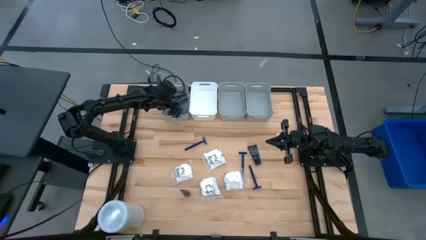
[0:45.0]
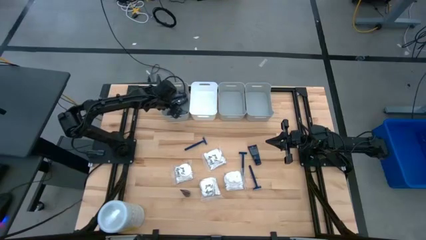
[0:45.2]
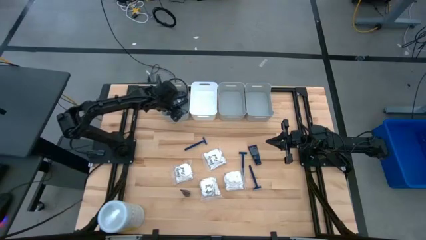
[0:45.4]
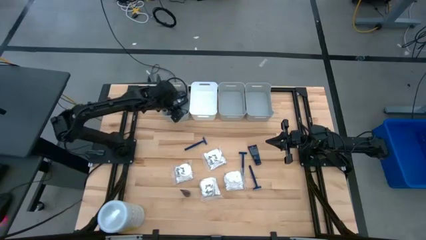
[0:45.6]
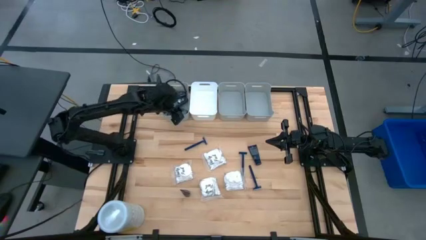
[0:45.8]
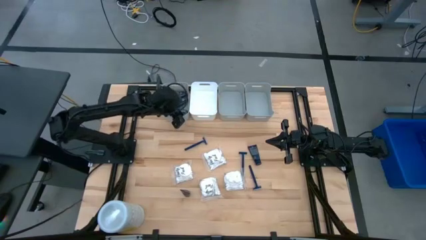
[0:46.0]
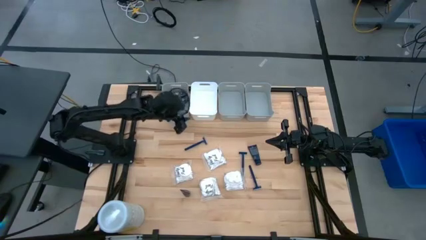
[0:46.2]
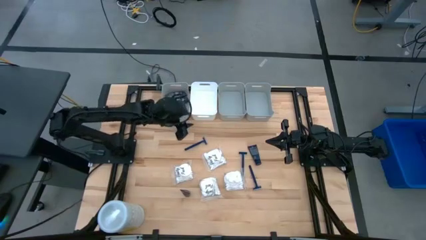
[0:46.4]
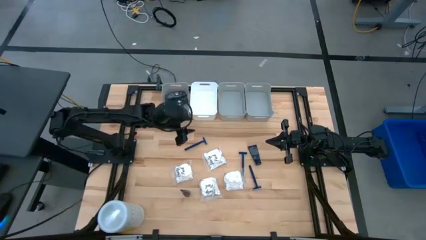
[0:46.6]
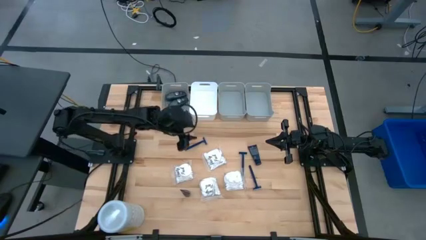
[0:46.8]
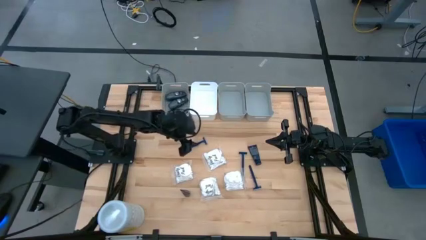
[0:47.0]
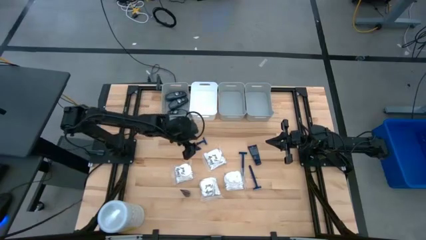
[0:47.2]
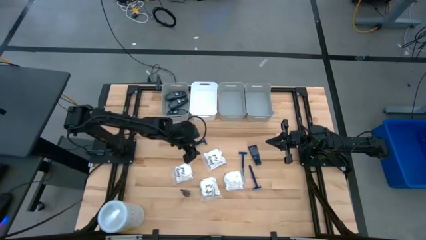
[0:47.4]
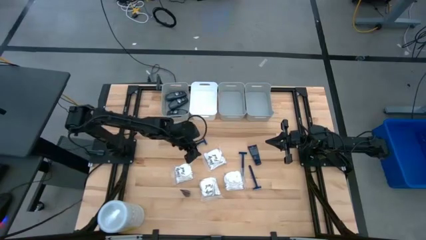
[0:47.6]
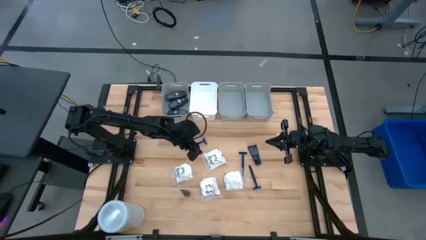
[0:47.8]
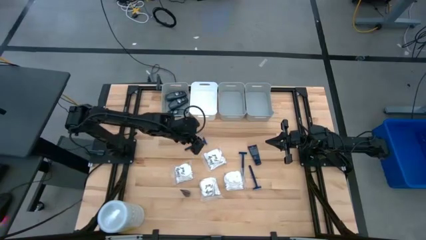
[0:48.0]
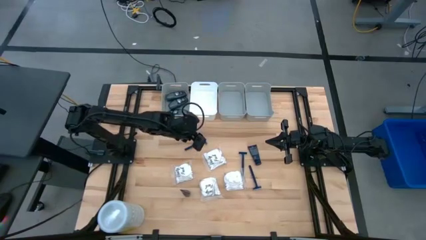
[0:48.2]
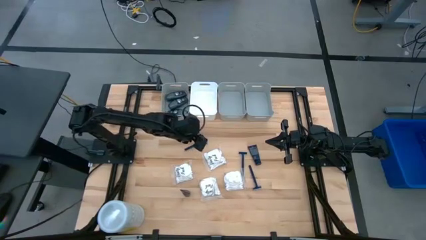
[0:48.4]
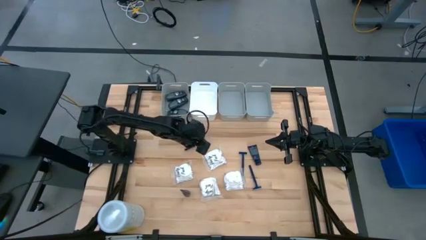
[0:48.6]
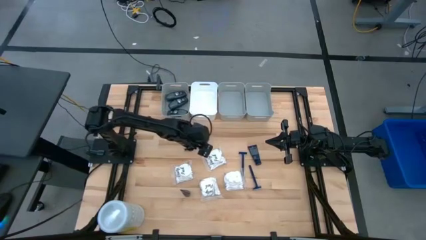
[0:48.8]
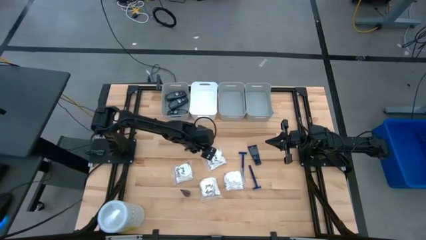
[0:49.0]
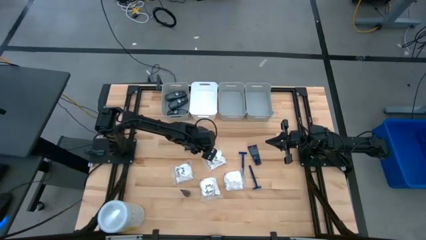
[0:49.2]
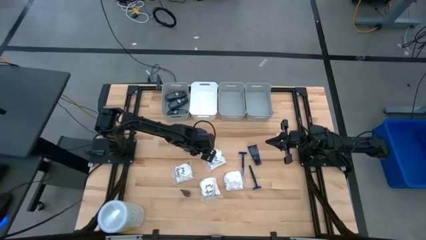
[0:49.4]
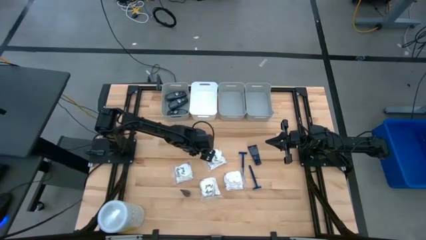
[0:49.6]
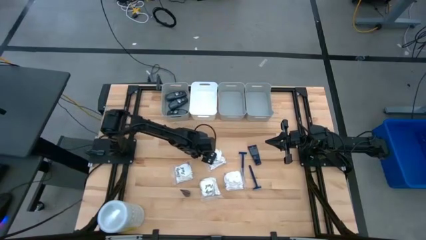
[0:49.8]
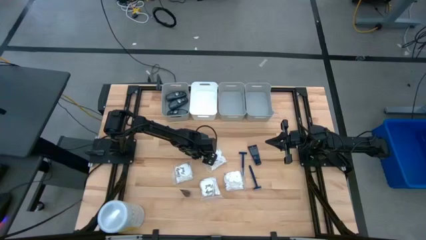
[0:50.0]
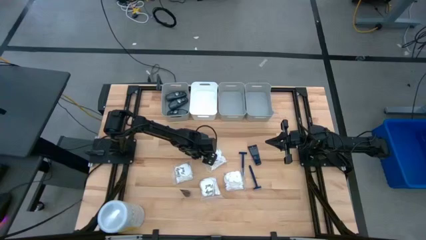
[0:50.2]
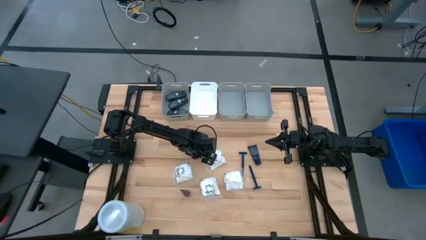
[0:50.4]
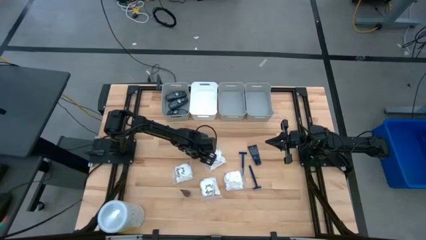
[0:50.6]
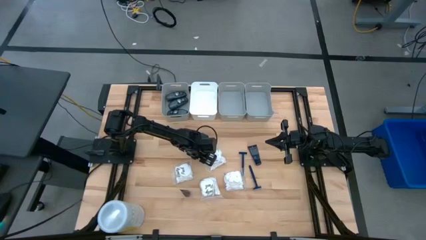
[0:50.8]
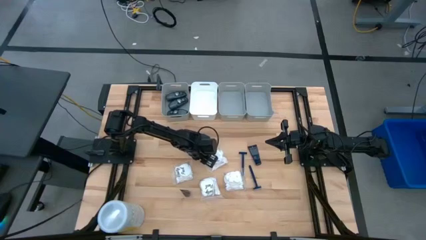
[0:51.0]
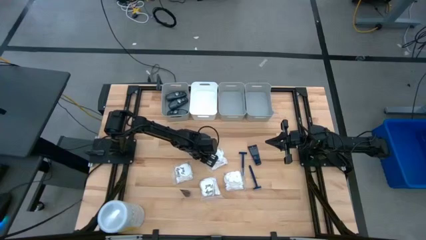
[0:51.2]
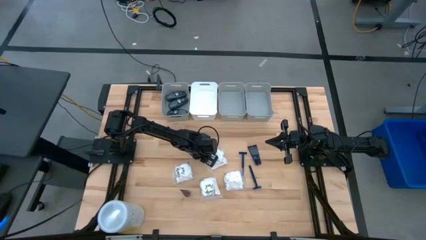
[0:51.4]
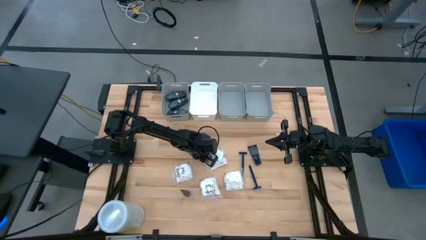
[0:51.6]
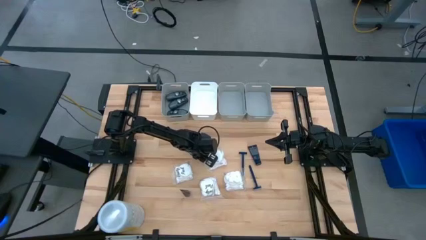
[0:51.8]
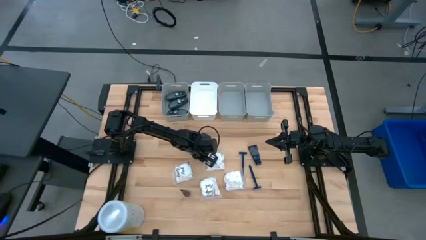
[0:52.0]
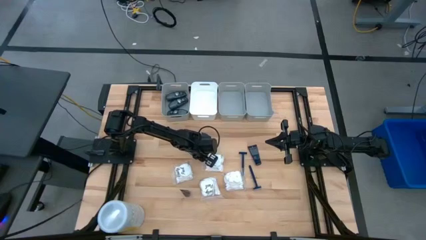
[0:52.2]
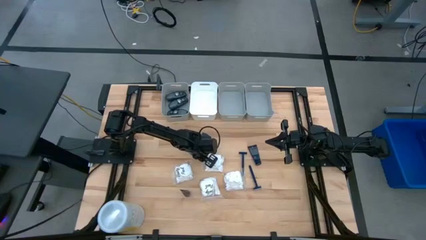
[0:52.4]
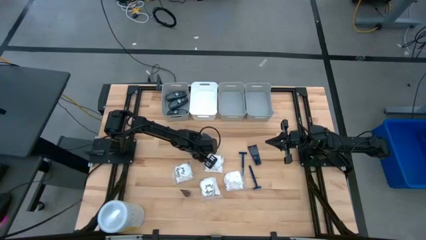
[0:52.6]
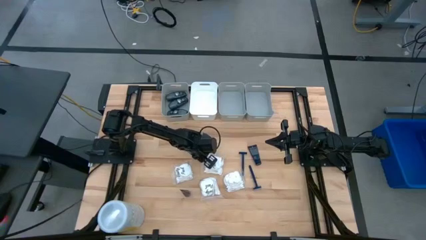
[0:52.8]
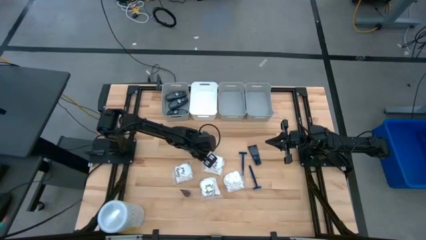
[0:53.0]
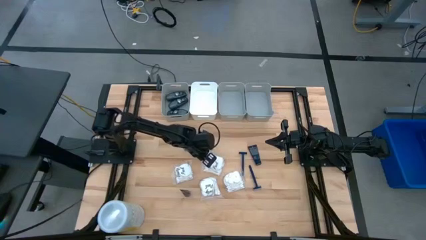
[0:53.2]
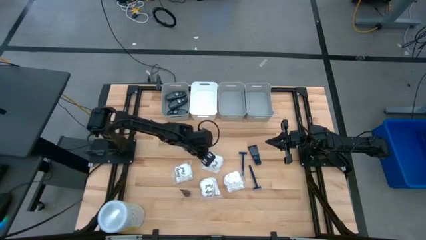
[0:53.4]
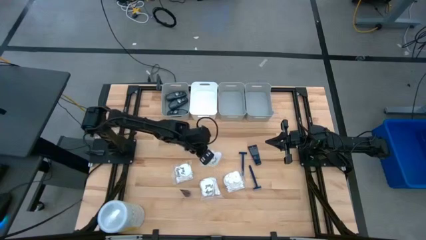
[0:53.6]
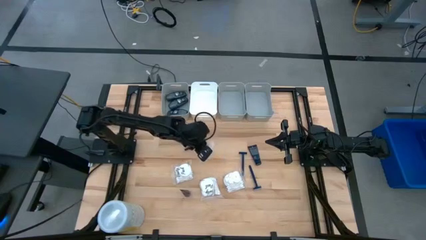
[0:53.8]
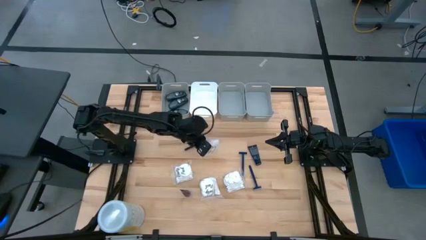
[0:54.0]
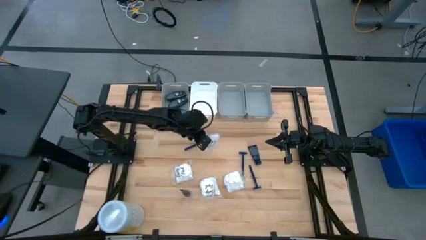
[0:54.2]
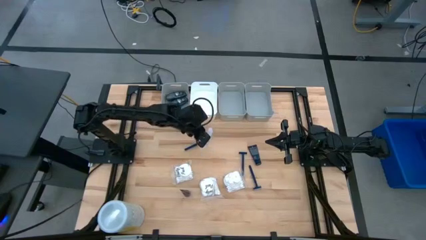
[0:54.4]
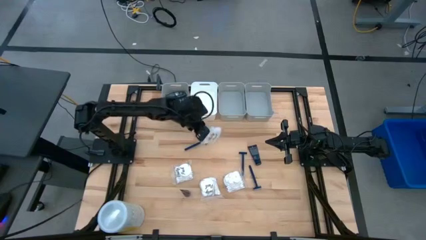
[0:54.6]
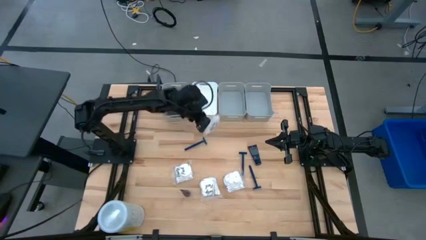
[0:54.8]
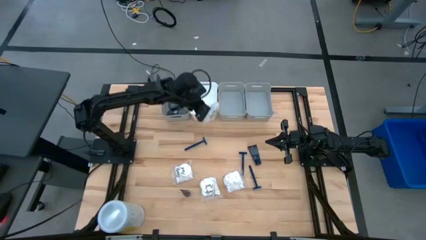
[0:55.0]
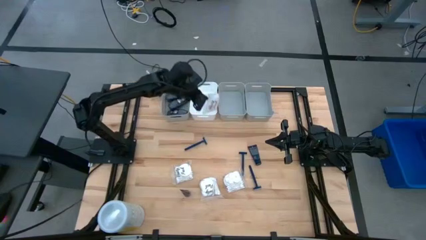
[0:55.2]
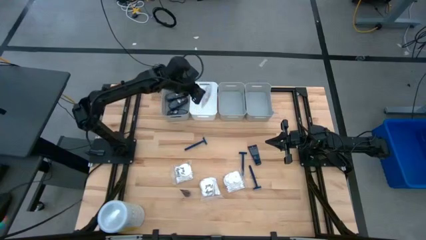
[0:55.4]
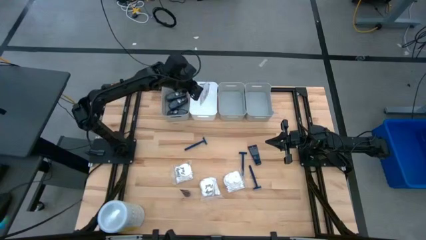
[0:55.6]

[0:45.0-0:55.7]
Task: Pick & Place Travel size toiletries
Put the white cotton pack into the white bin
